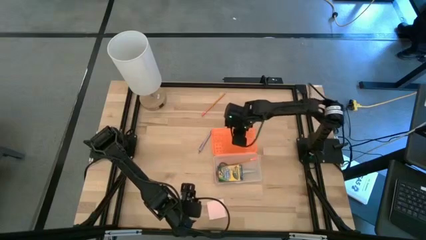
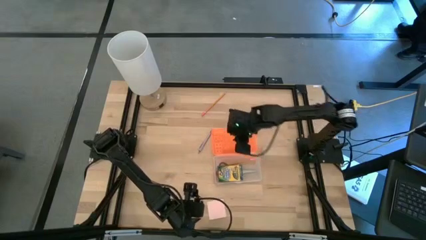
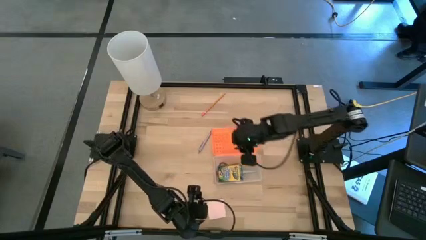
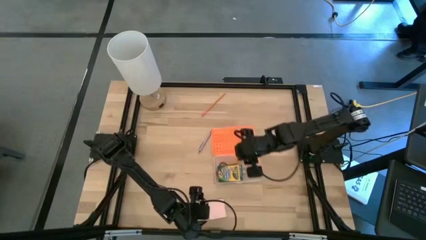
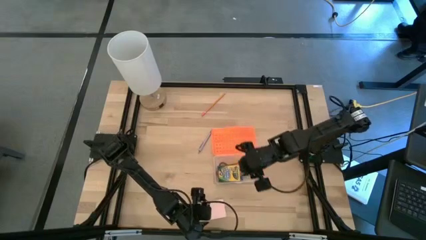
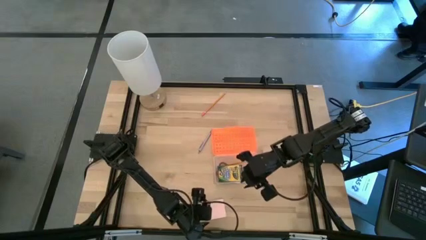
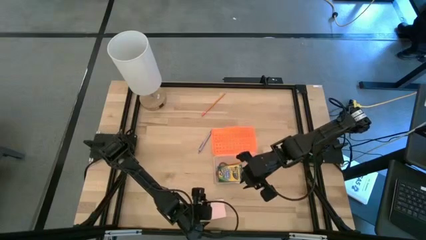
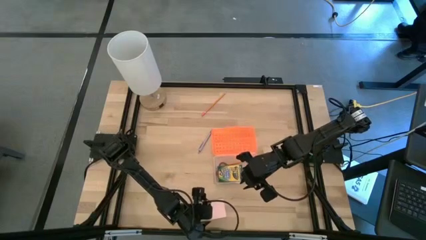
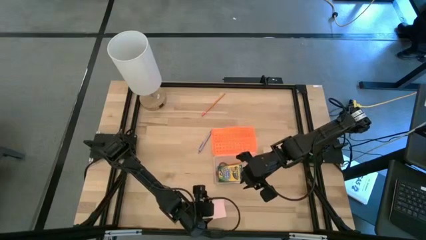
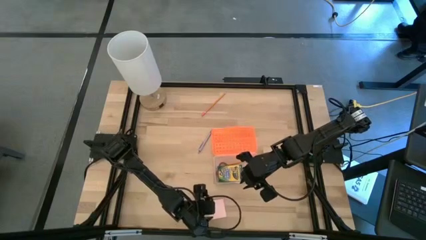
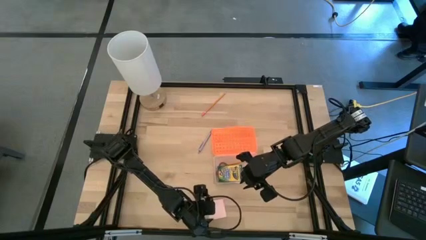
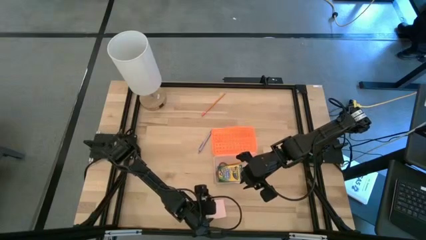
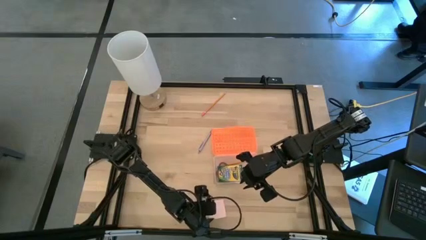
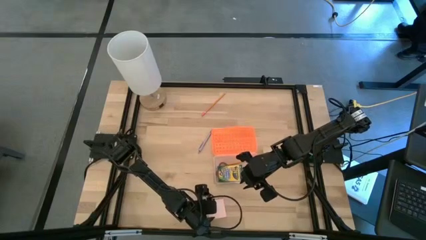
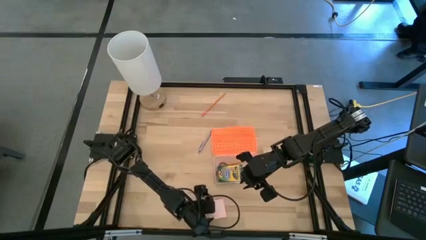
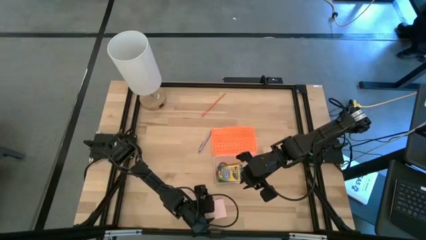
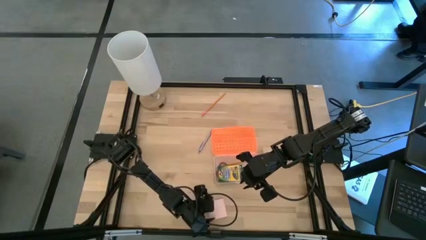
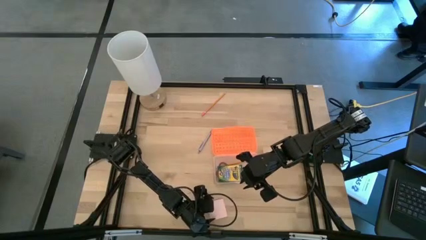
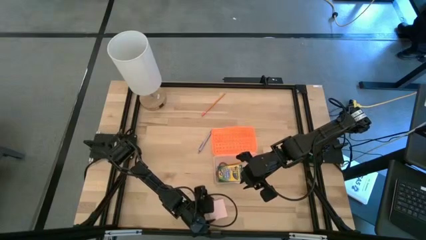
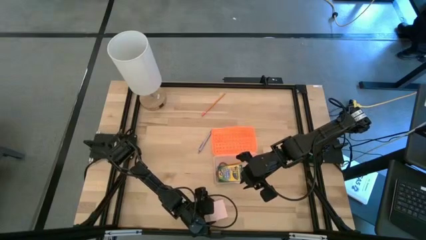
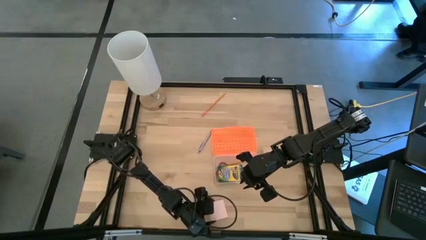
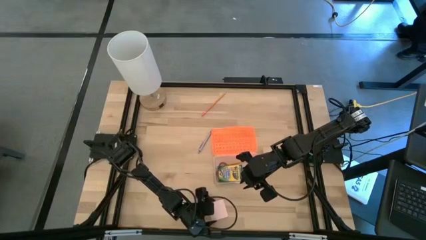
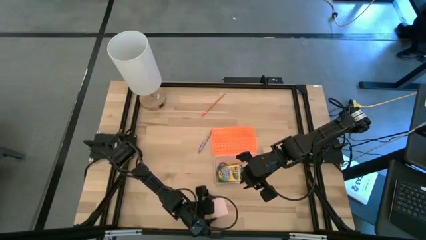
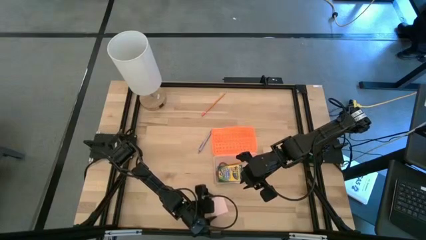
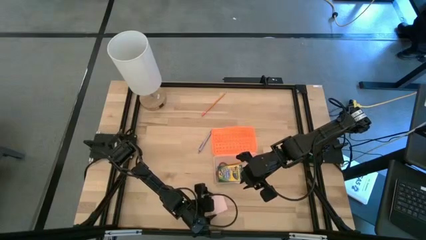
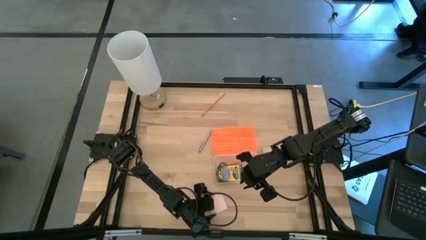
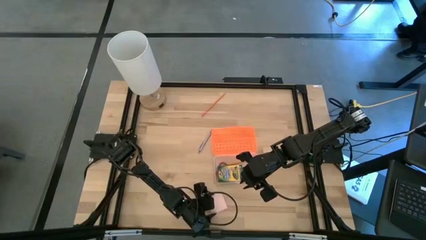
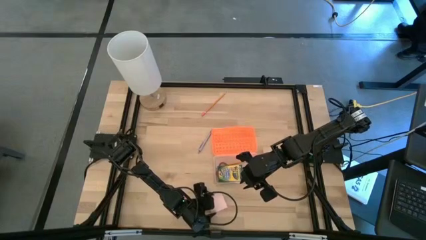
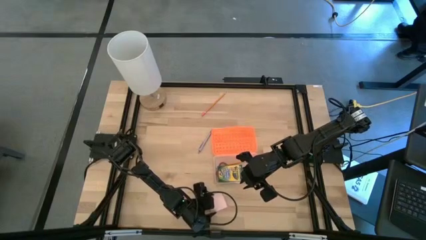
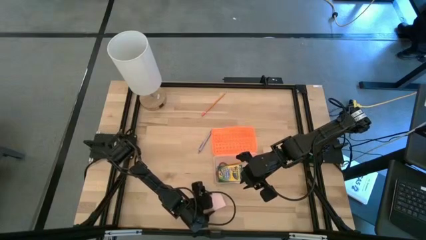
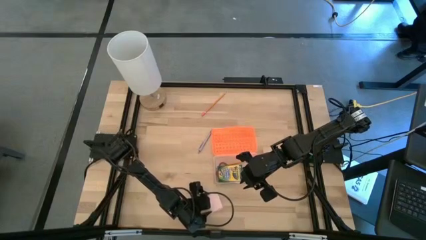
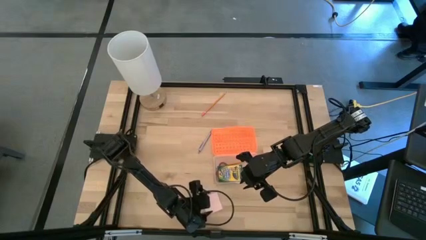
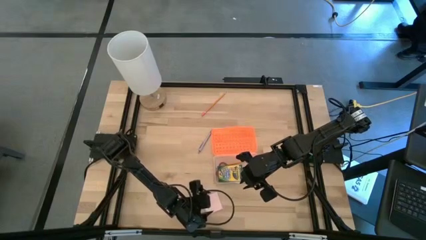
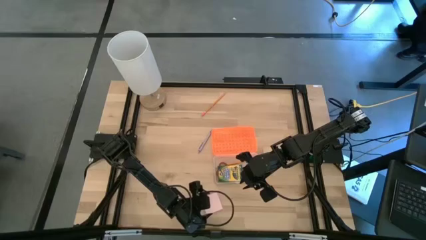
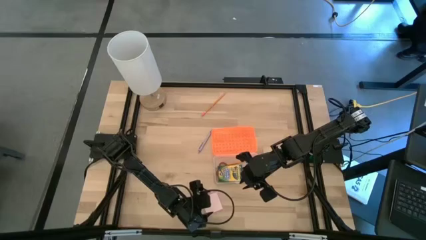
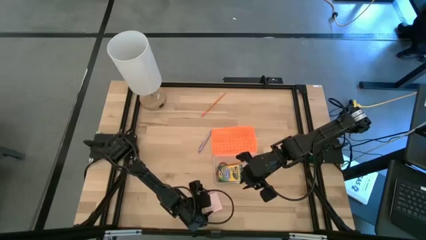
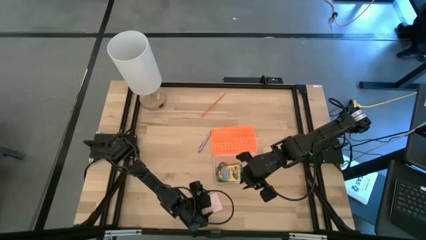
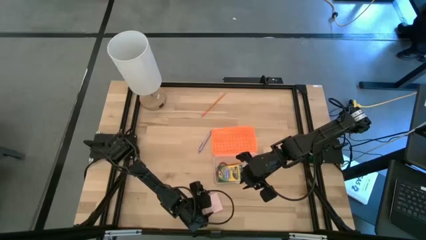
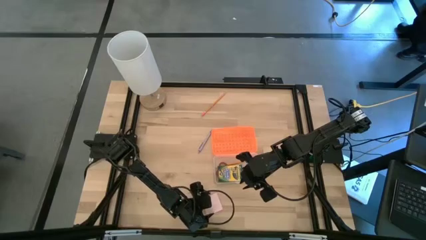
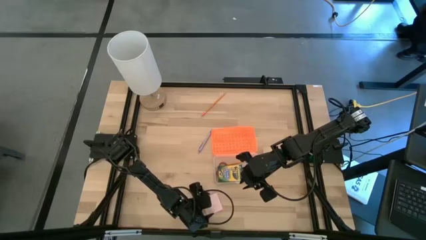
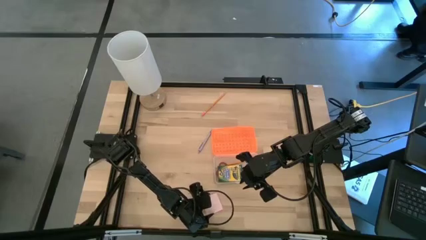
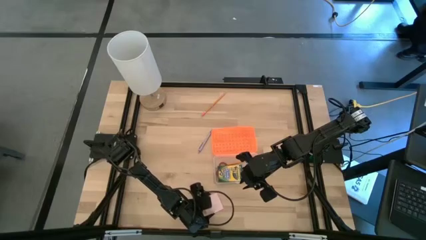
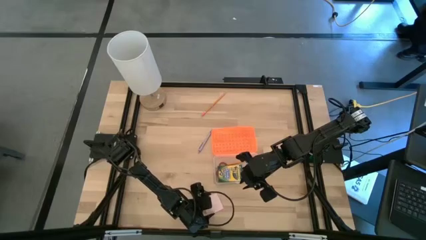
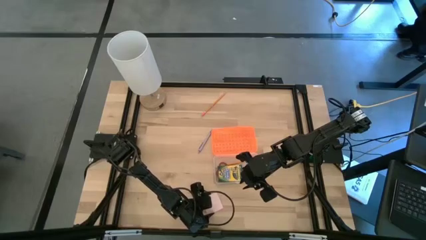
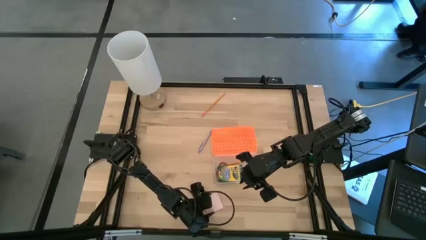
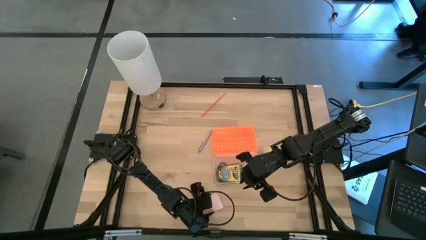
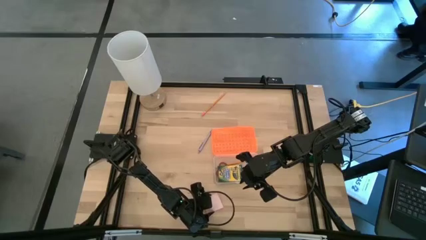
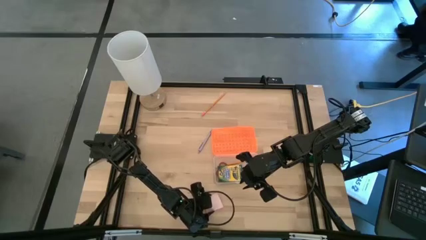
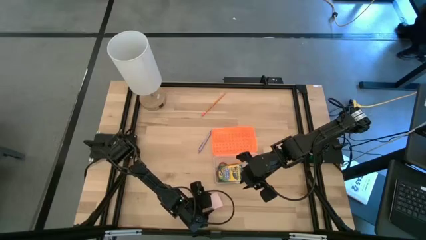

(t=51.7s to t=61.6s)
Task: Pack school essentials
Put the pink sticky notes into the orange supply box
